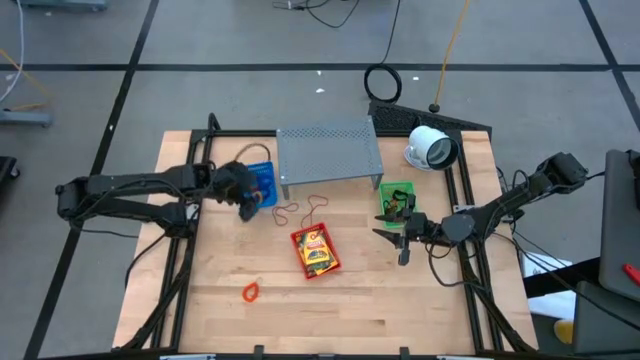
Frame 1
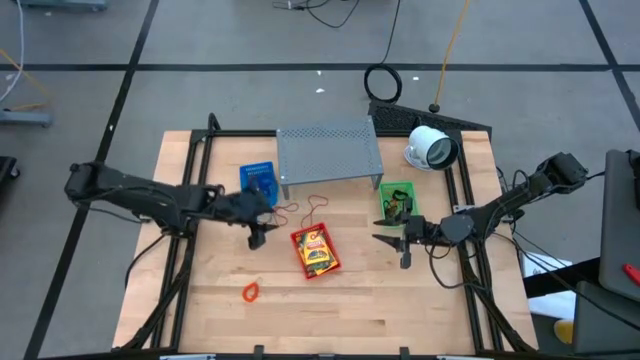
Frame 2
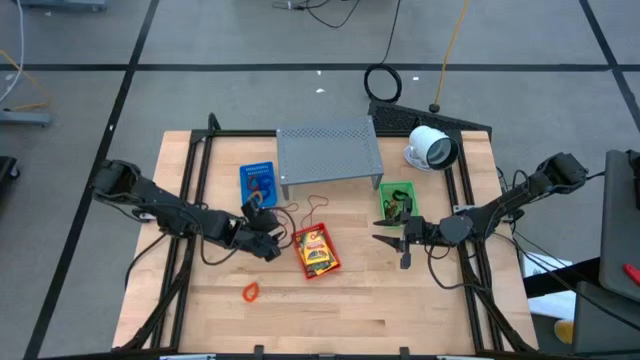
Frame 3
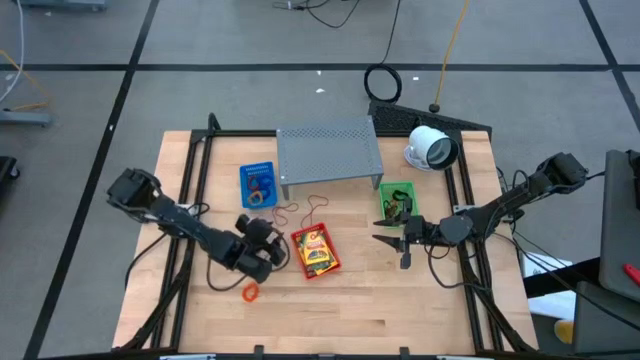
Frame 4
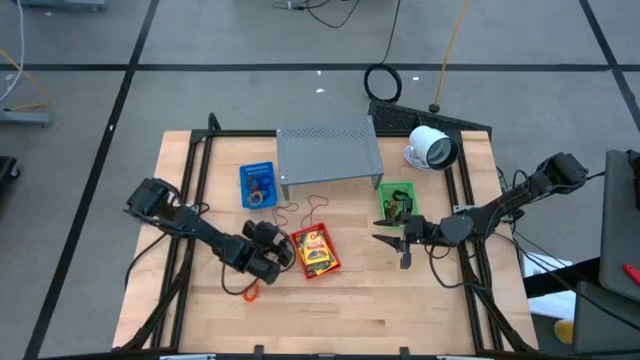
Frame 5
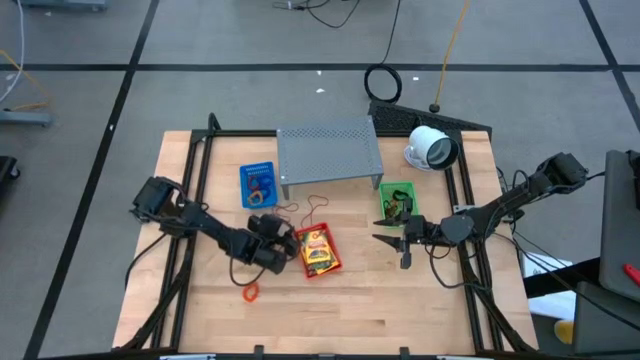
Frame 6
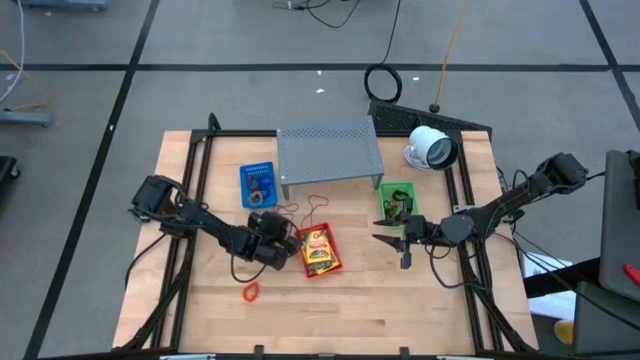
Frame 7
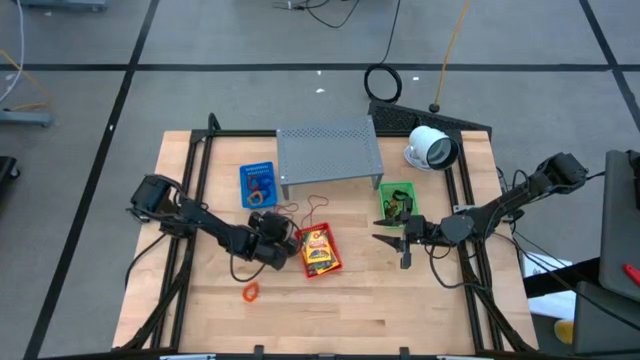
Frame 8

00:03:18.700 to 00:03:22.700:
Task: Pick & Place Office Desk Supplies
Put the left red rubber band into the green bin

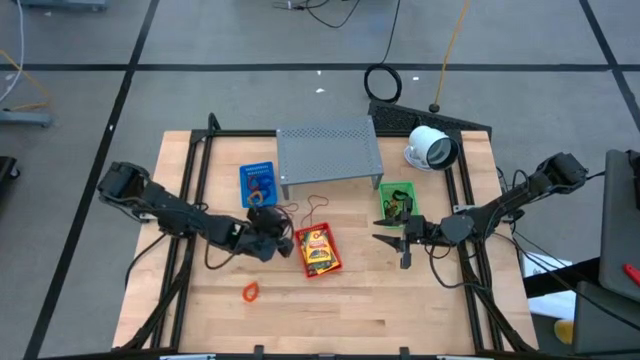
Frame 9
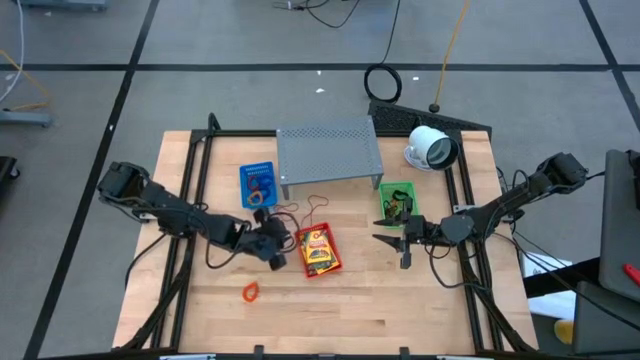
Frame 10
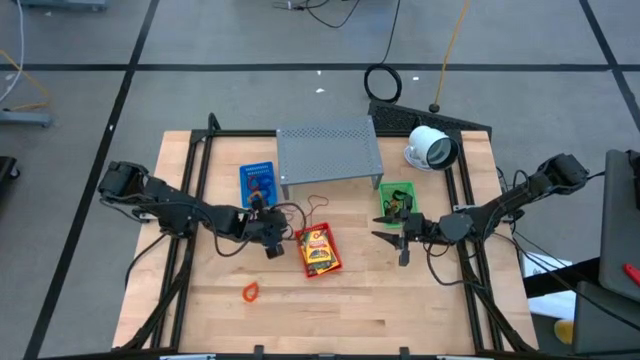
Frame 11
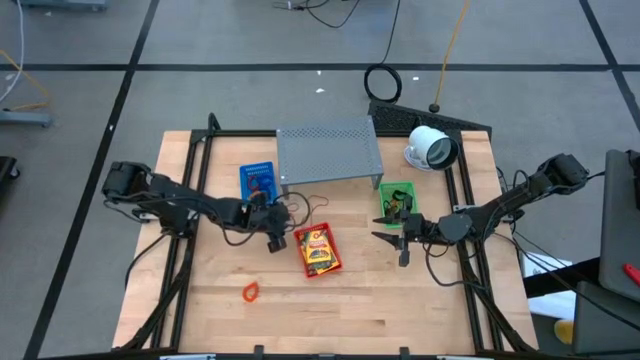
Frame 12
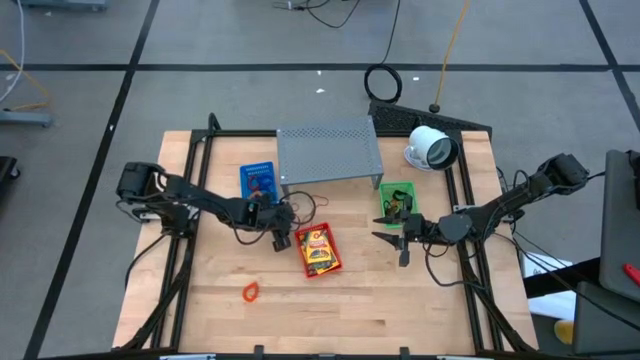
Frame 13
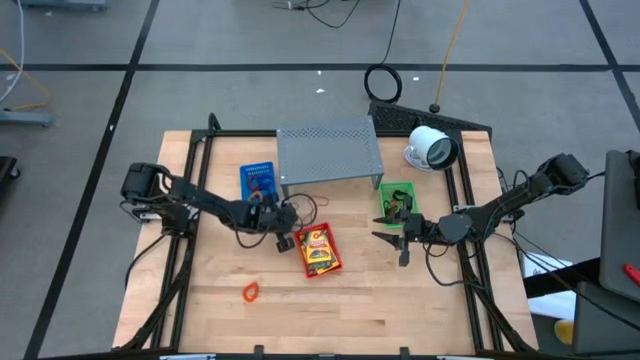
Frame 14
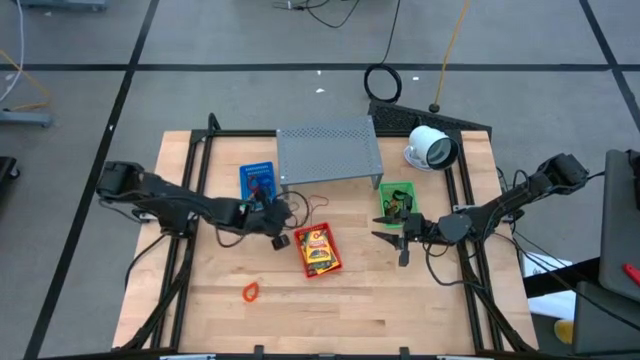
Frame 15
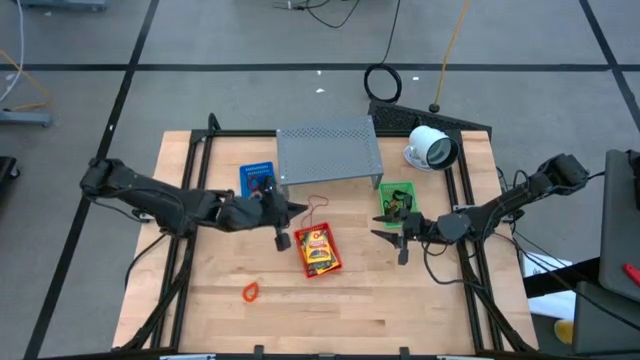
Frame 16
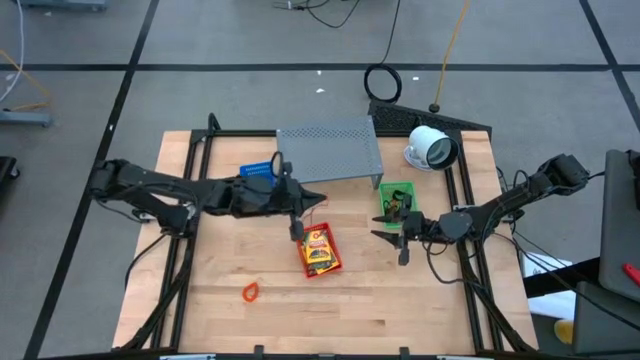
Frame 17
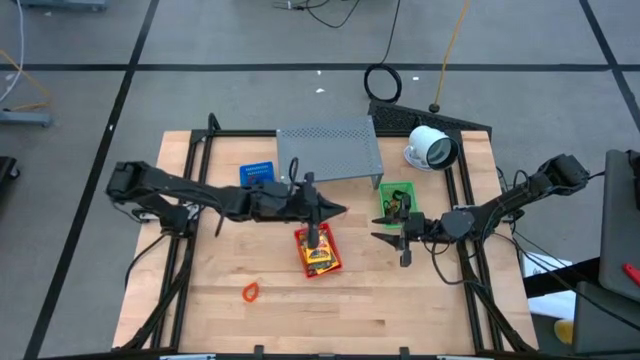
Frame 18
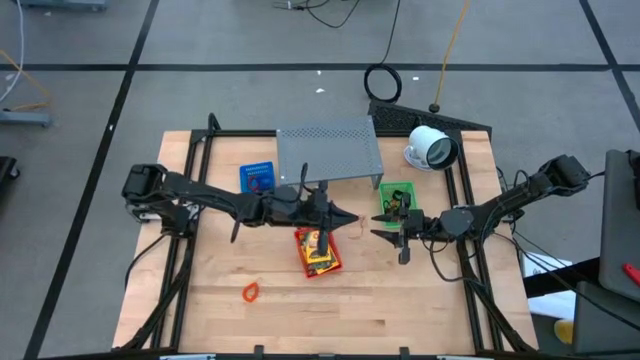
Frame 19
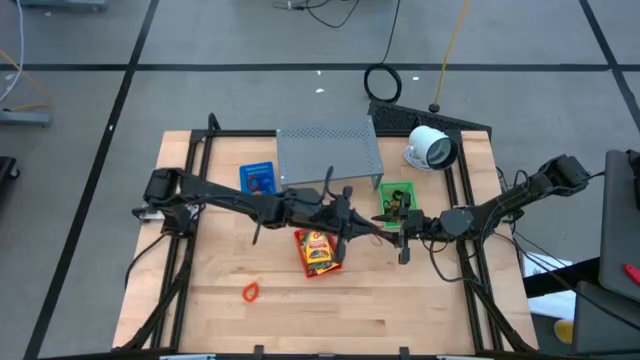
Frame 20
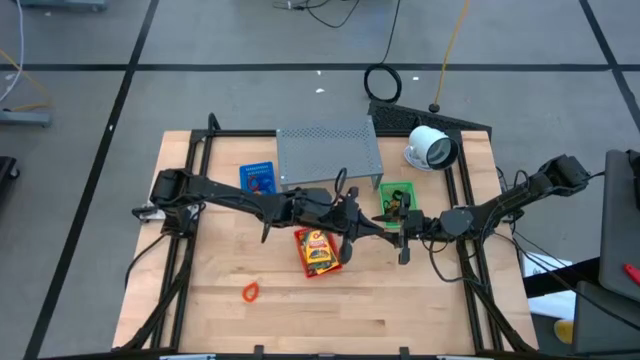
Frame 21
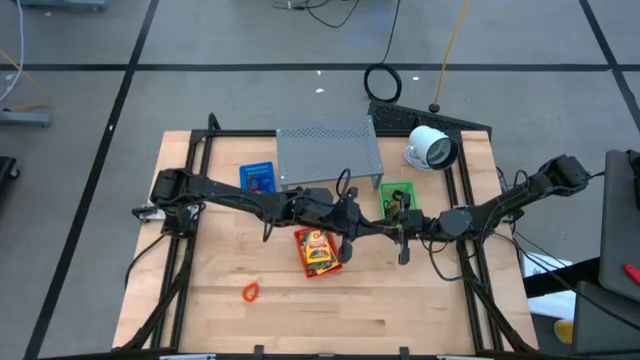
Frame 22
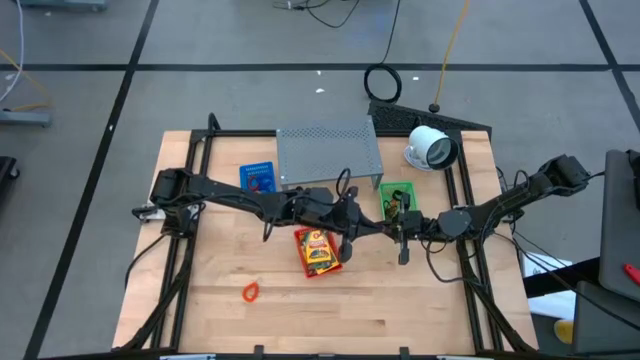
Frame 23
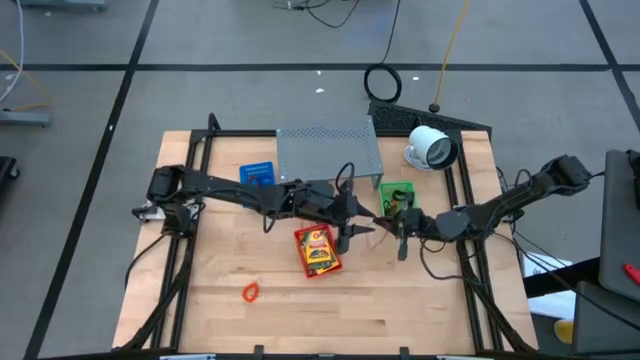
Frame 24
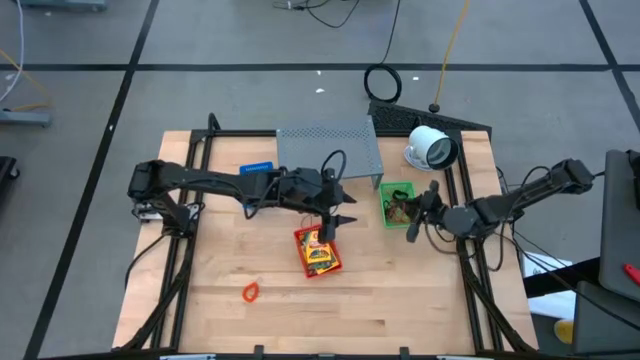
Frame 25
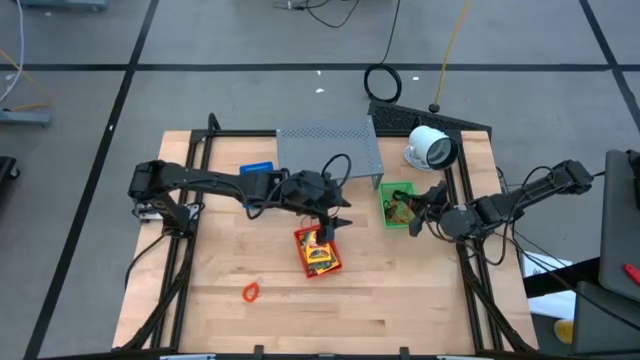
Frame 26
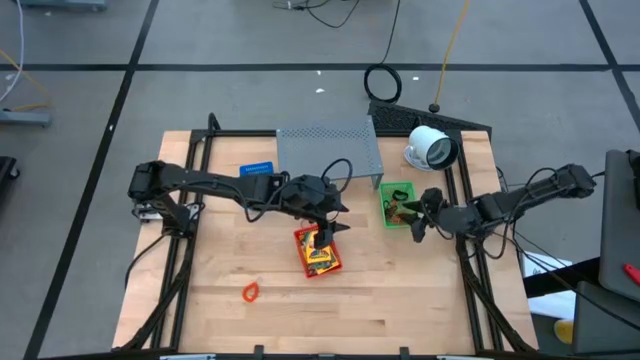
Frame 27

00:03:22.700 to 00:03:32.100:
Put the left red rubber band into the green bin

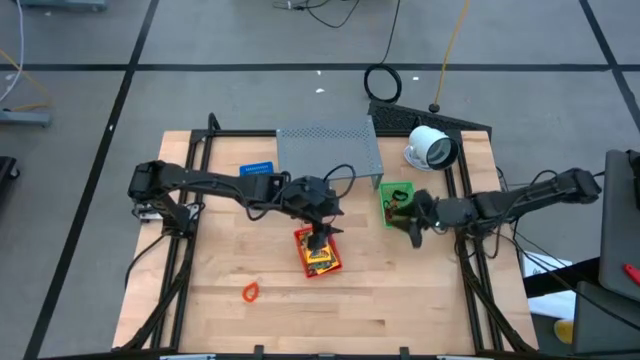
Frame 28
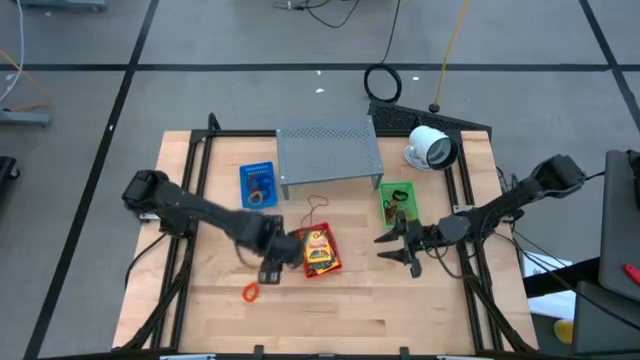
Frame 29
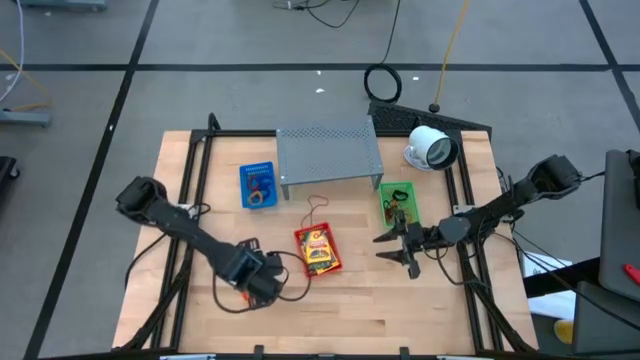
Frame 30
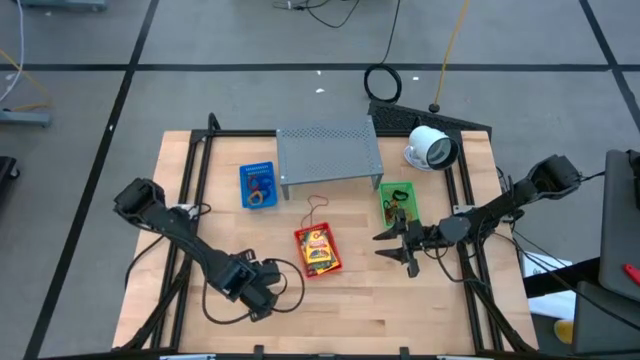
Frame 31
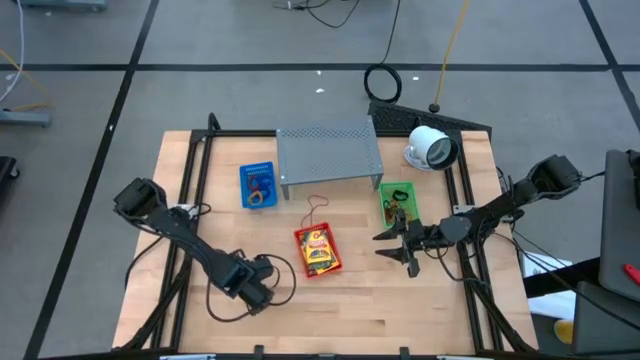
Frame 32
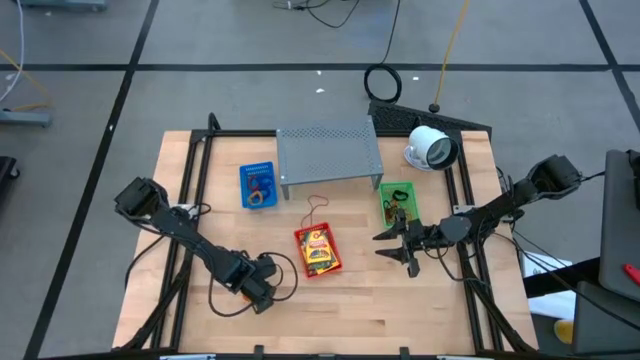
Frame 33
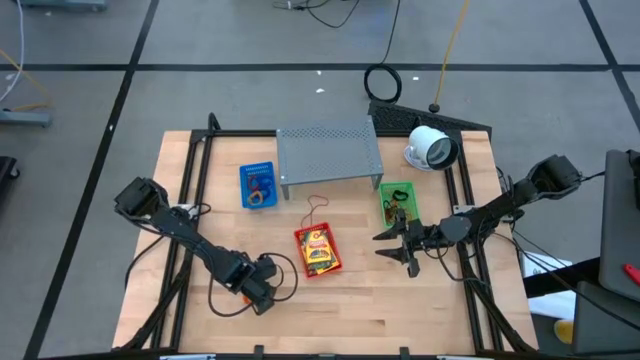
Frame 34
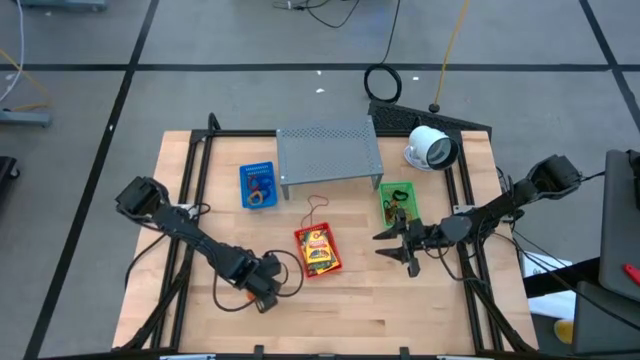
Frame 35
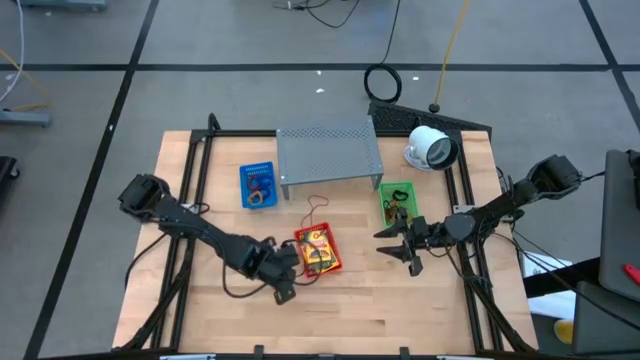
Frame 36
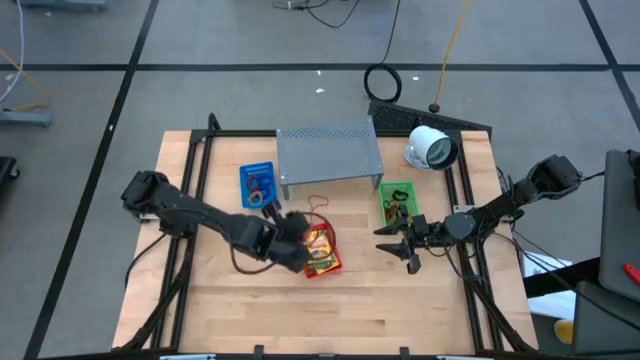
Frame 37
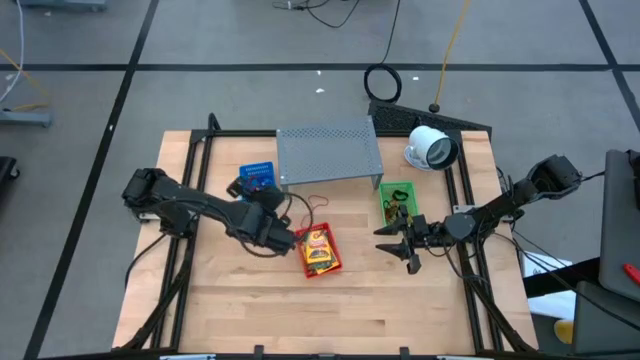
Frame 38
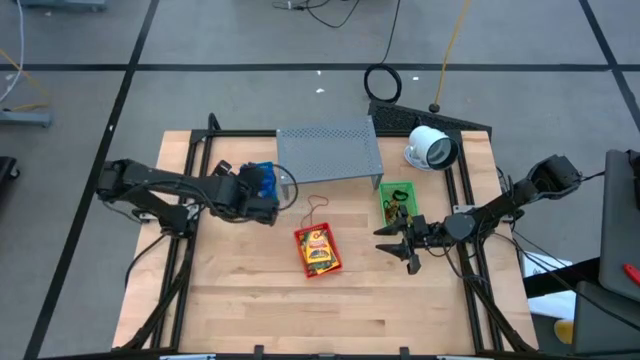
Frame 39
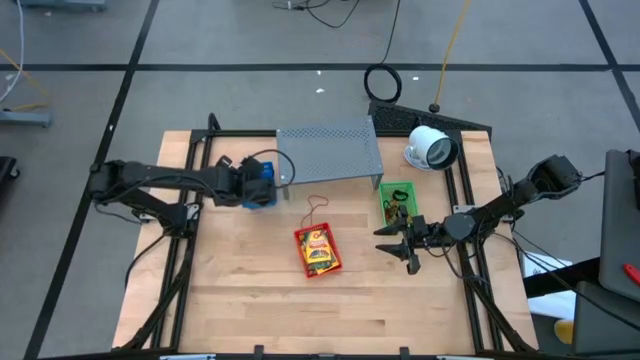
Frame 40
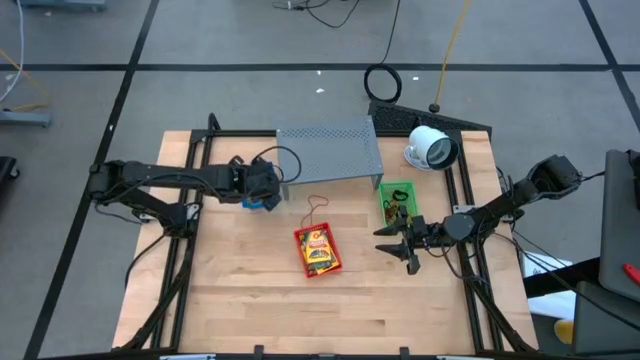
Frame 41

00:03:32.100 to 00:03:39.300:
Put the orange spring keychain into the blue bin

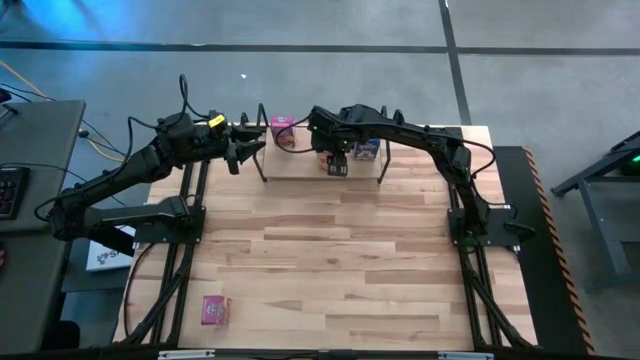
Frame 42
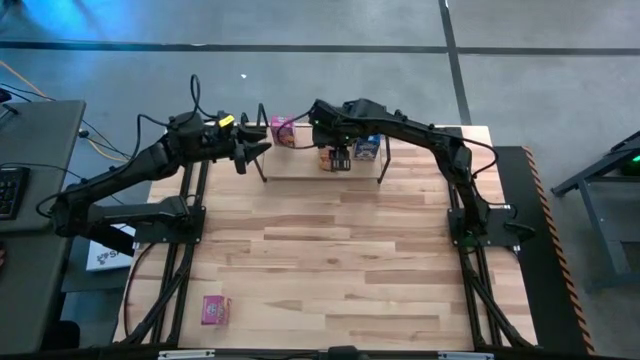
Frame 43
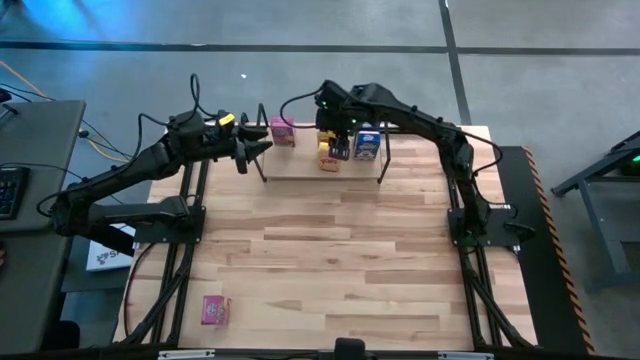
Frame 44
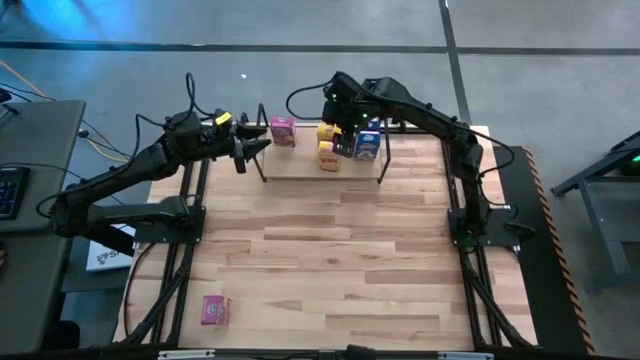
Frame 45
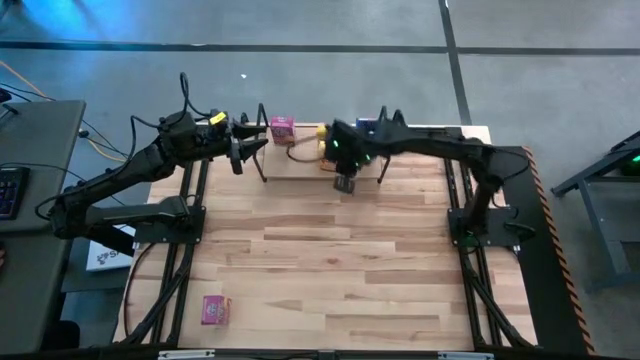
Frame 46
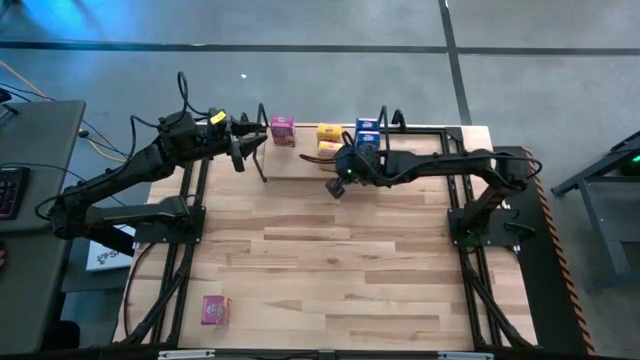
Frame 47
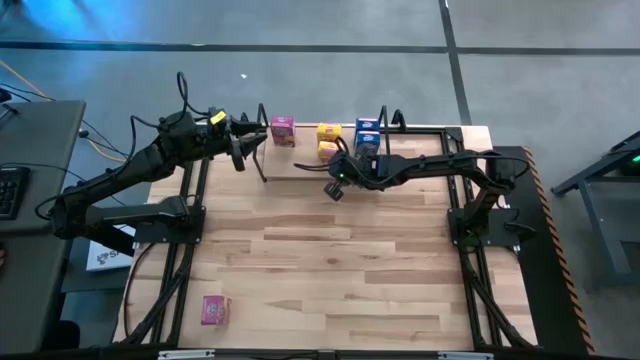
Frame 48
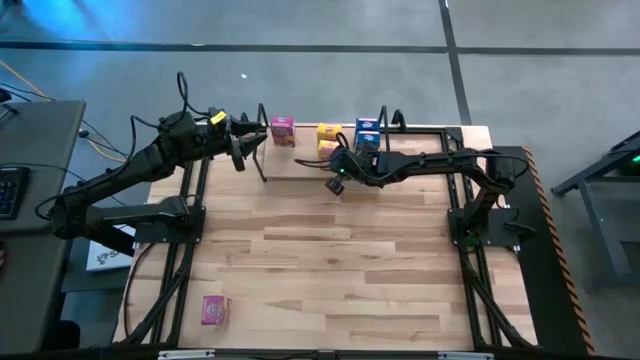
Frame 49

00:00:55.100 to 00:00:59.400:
Task: Stack cereal on shelf
Adjust the yellow cereal box on the shelf
